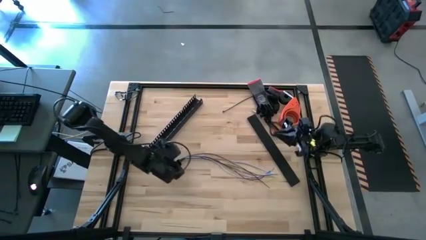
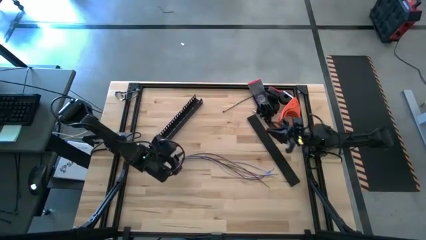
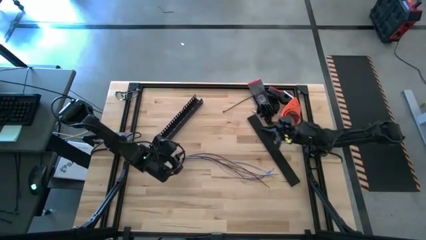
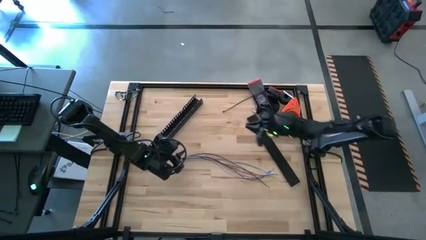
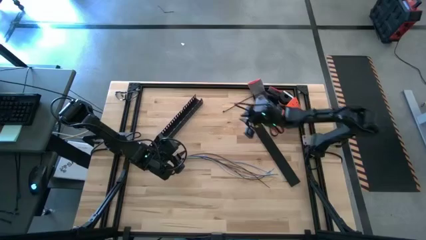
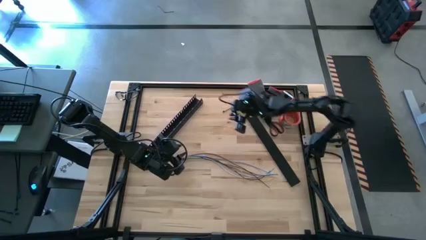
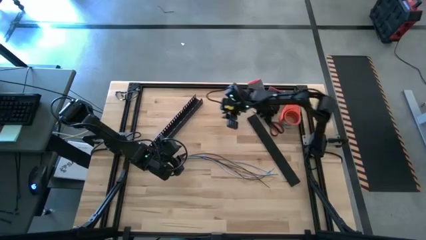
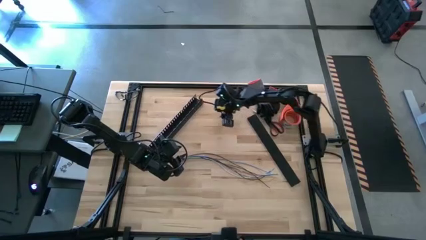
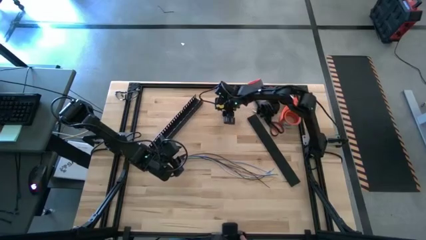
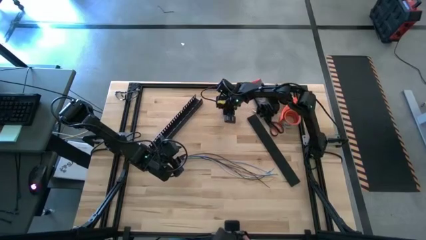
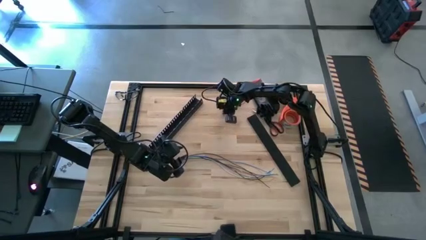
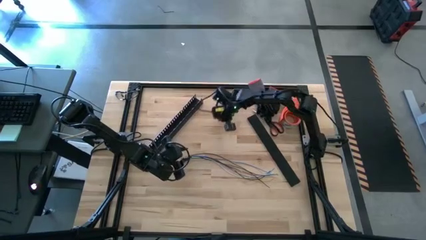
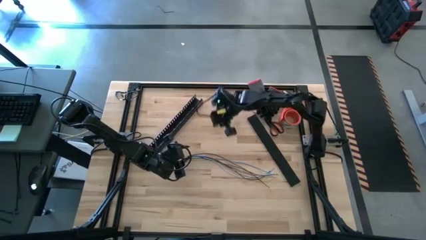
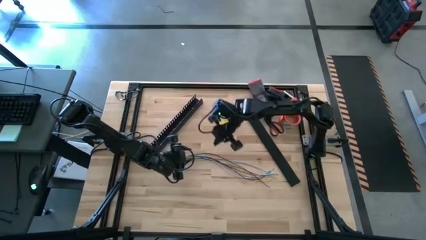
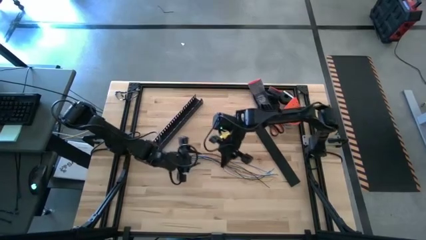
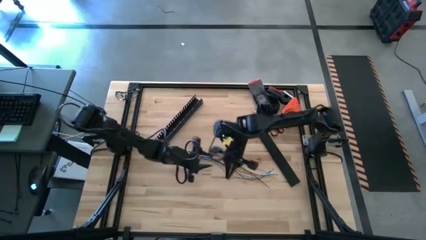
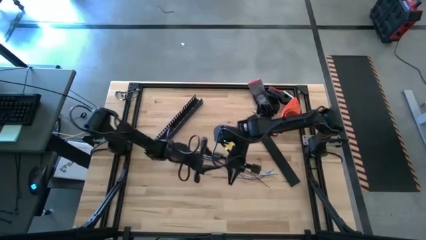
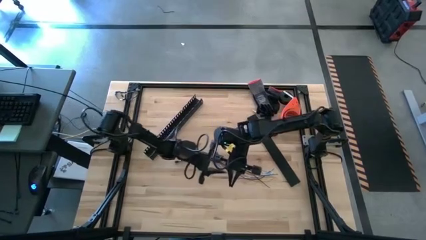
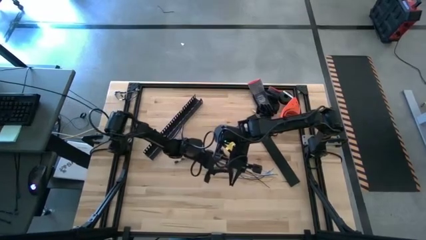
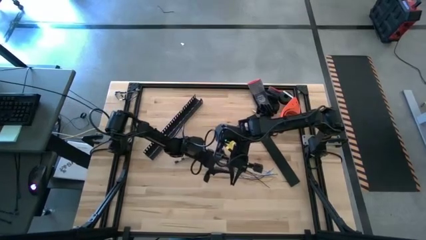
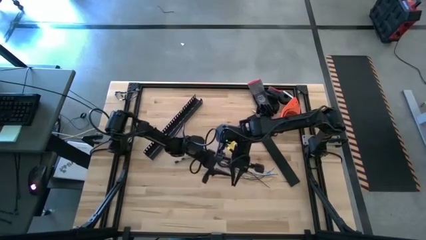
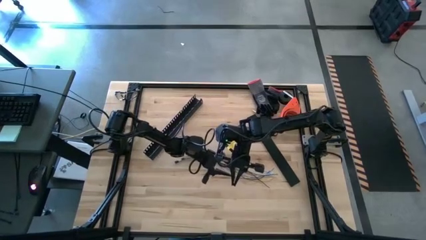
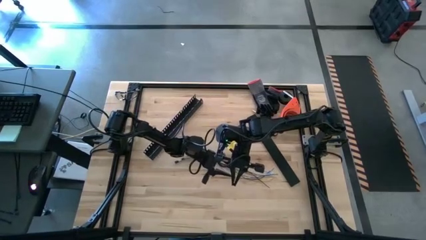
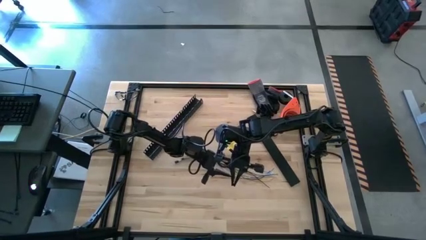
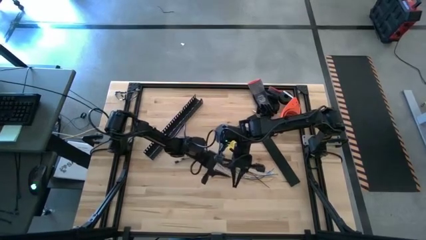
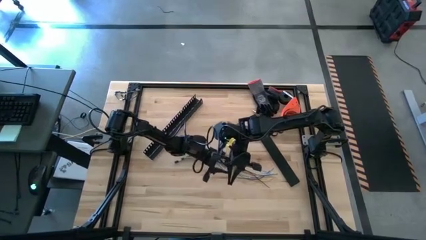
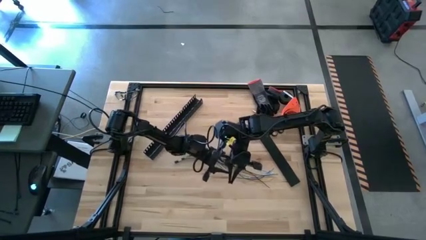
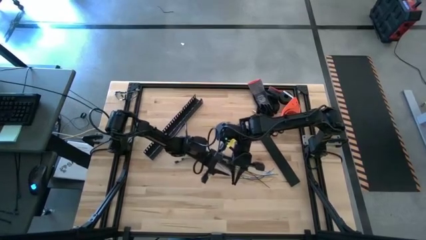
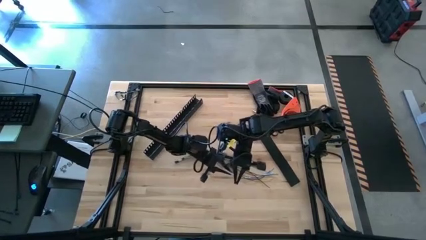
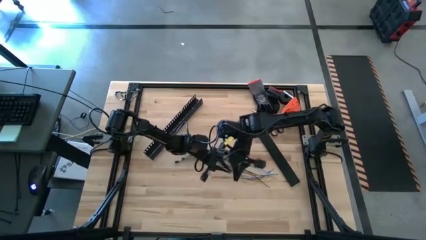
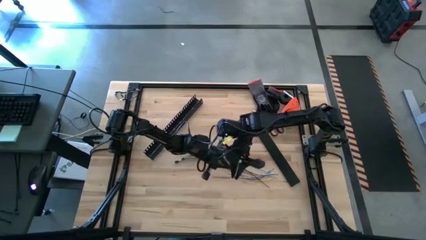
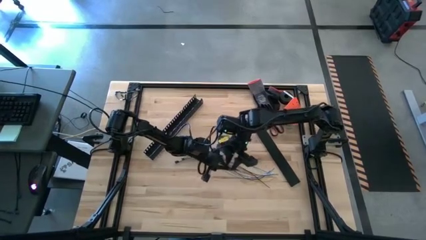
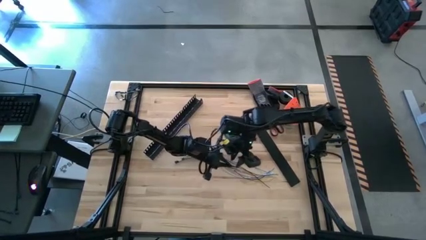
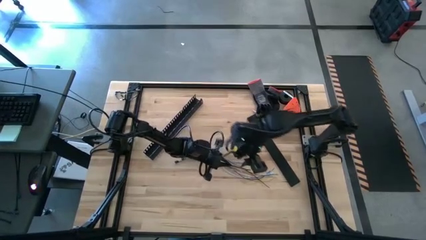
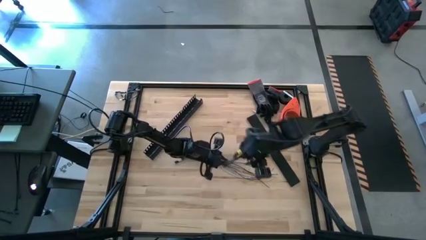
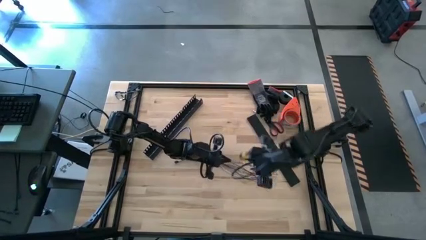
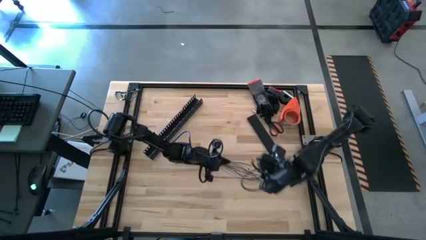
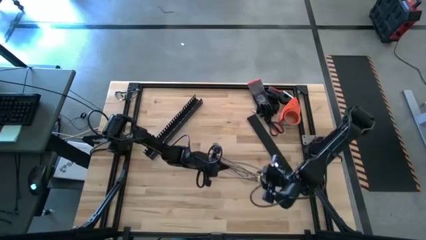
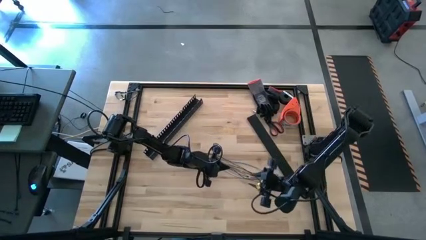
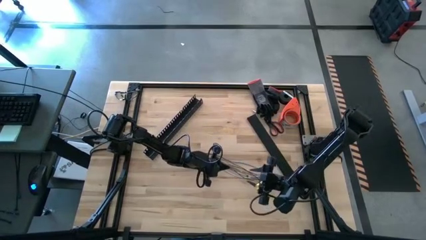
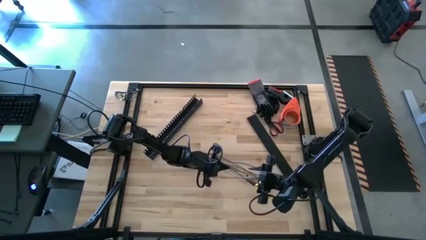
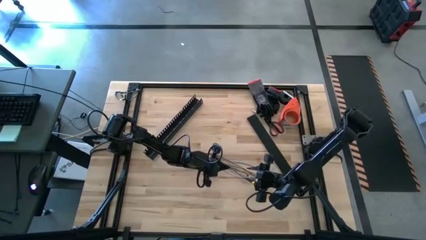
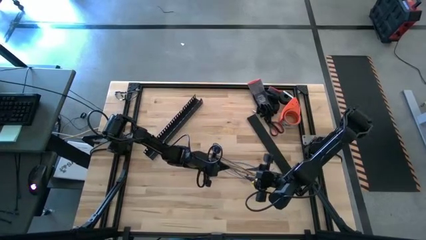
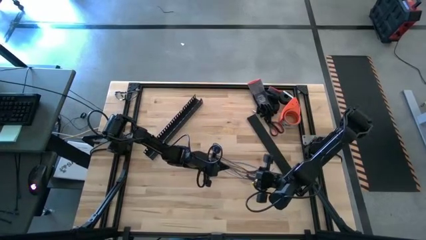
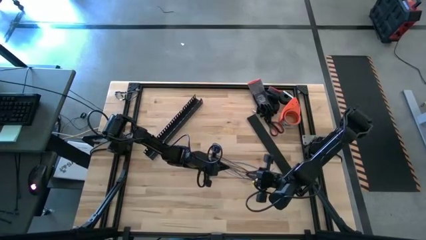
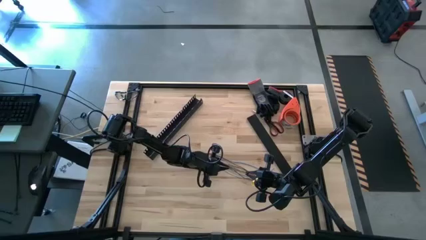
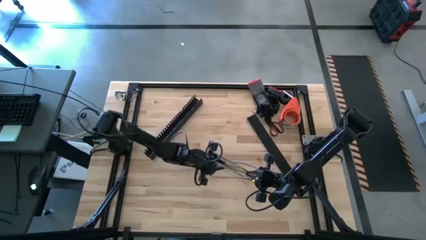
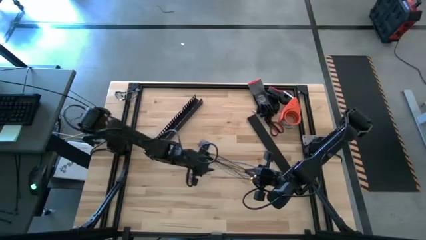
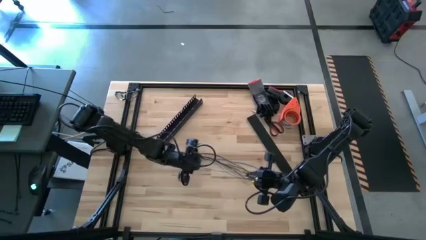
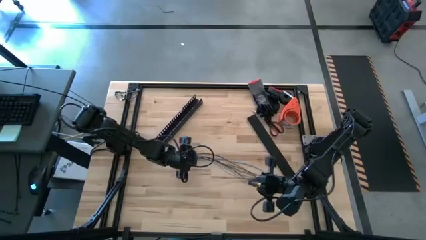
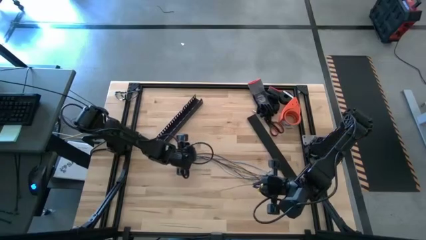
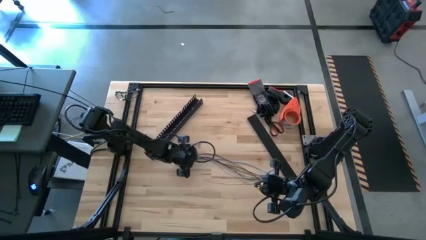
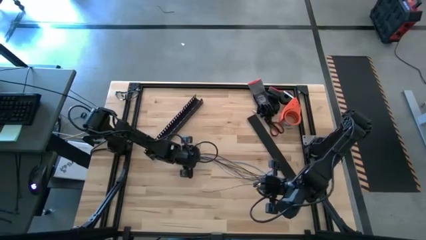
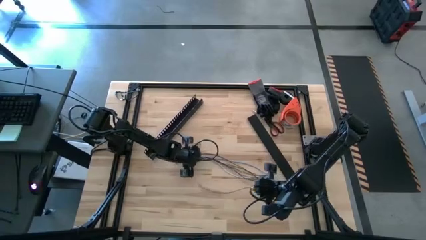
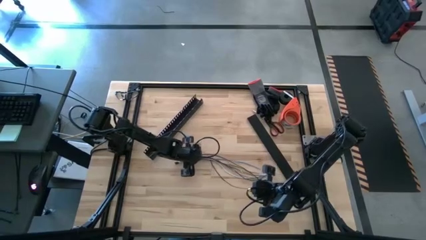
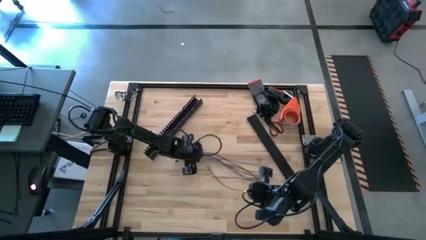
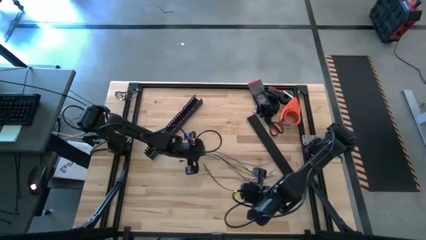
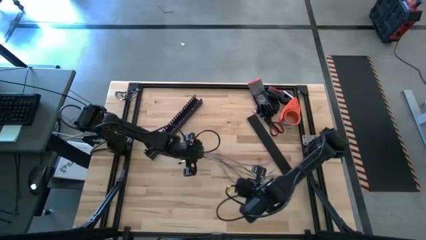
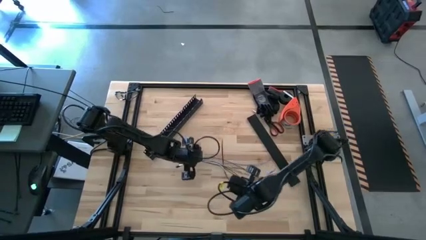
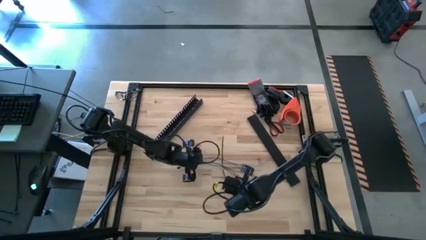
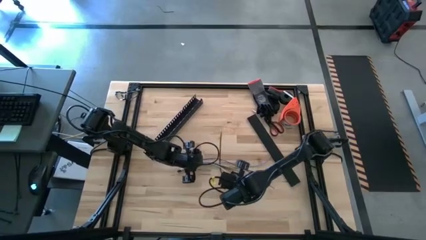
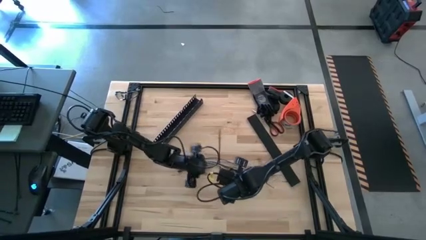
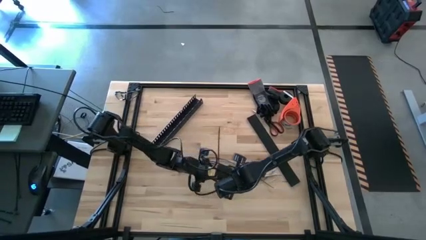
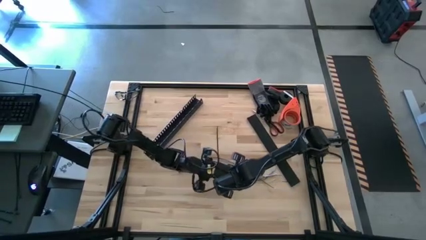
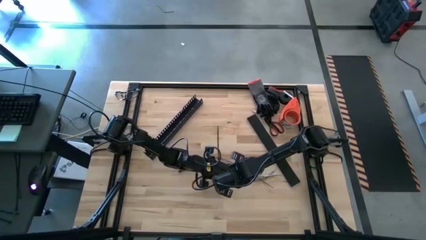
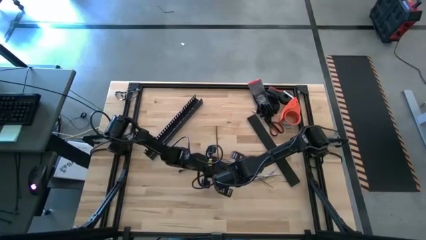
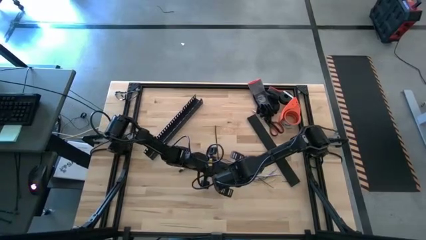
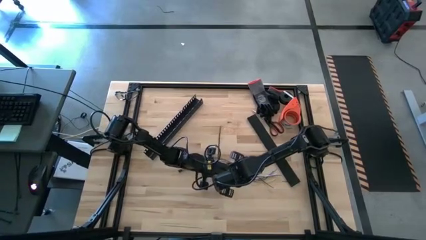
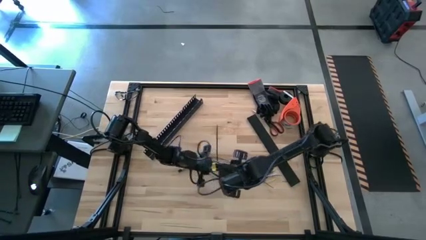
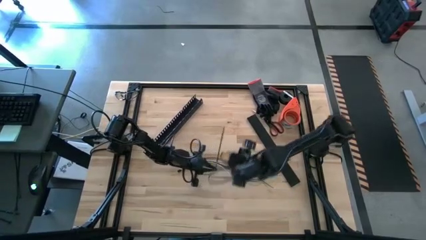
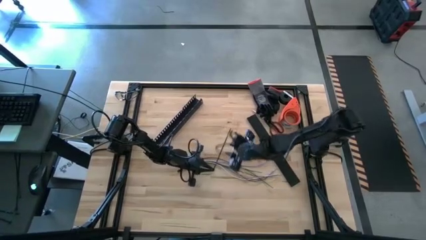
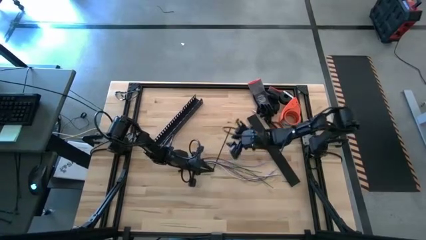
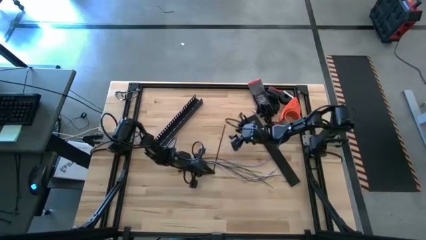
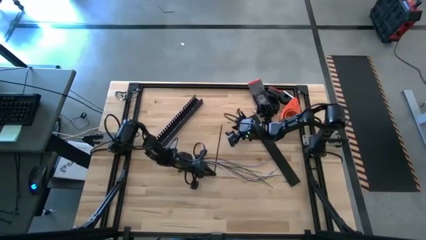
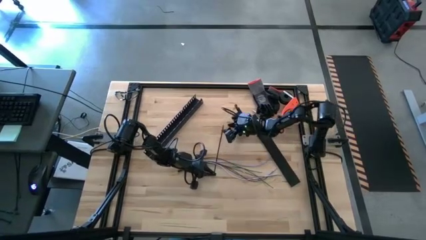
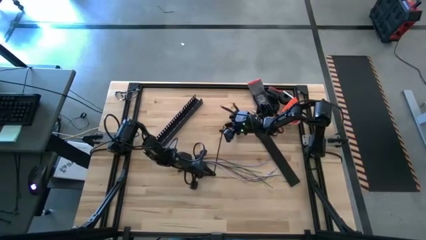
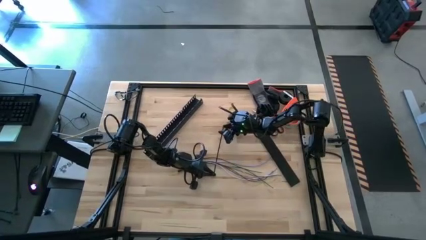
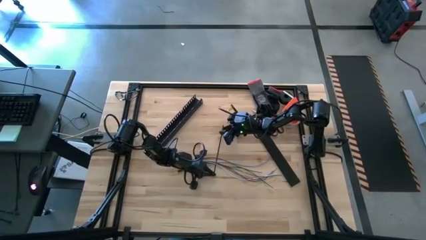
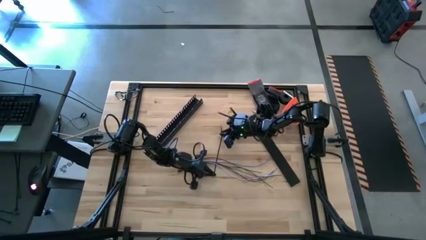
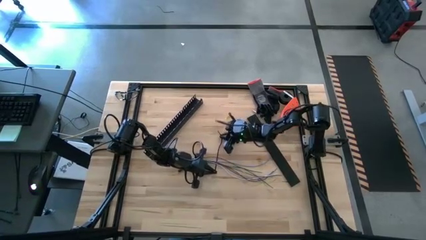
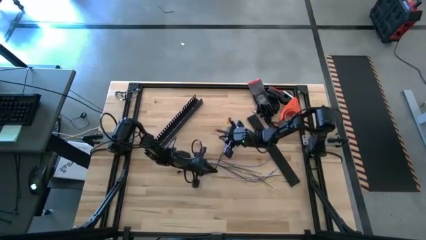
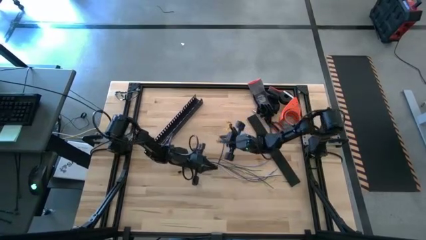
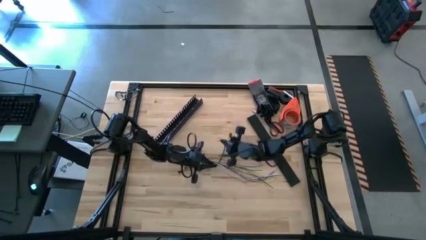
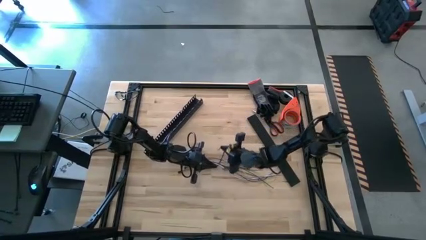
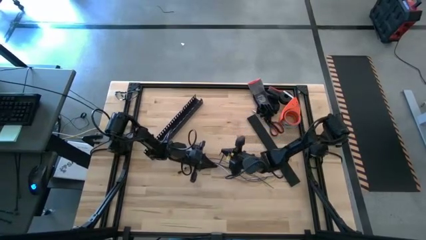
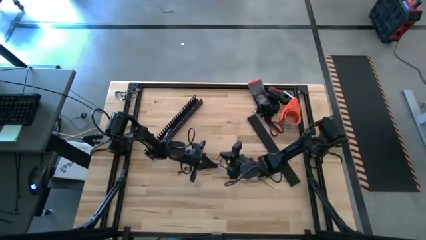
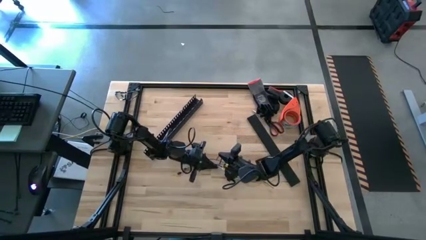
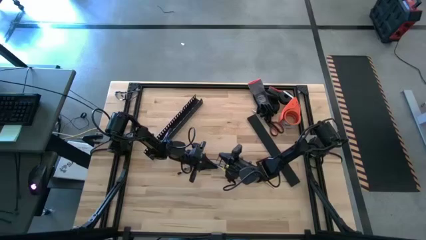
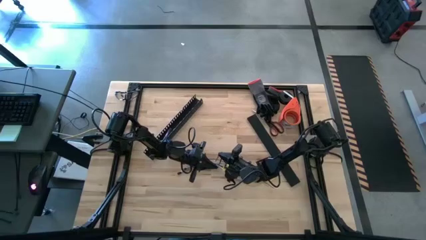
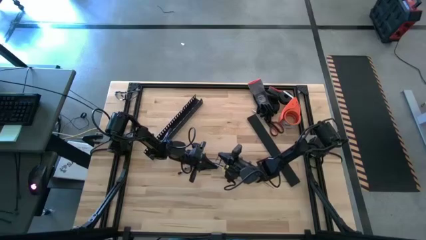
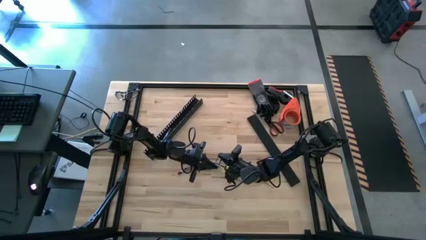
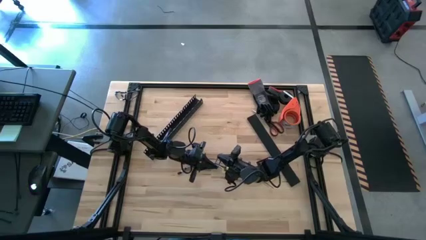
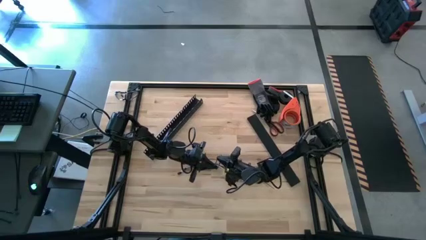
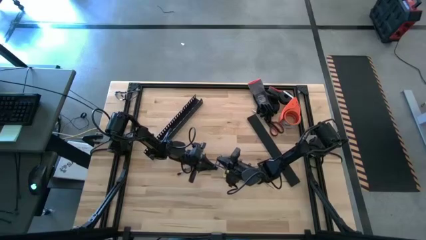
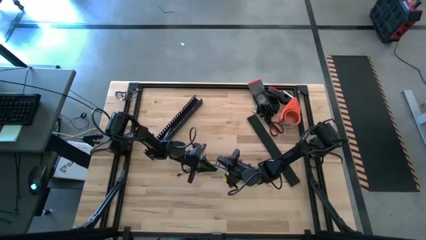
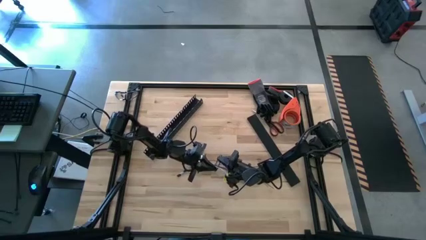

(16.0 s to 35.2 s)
Task: Ziptie cables
Wrap the cables with a black zip tie
